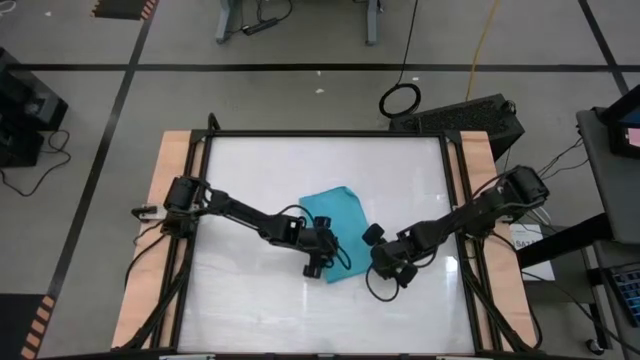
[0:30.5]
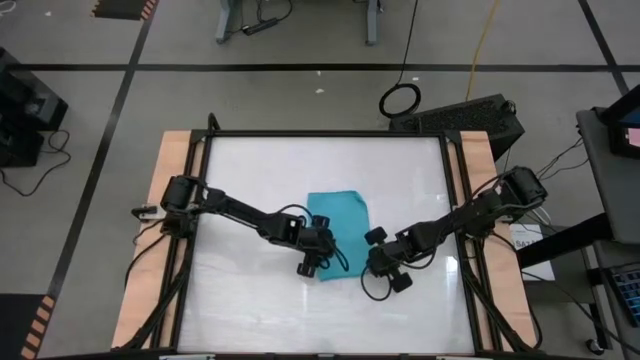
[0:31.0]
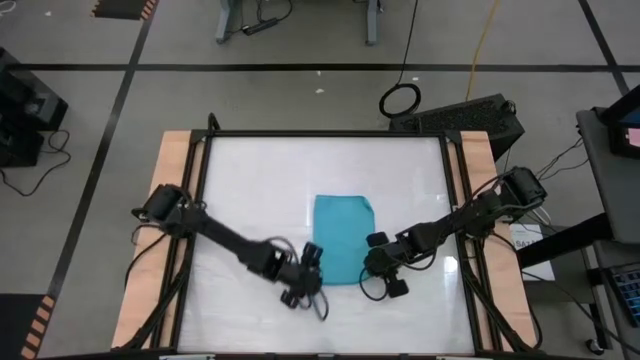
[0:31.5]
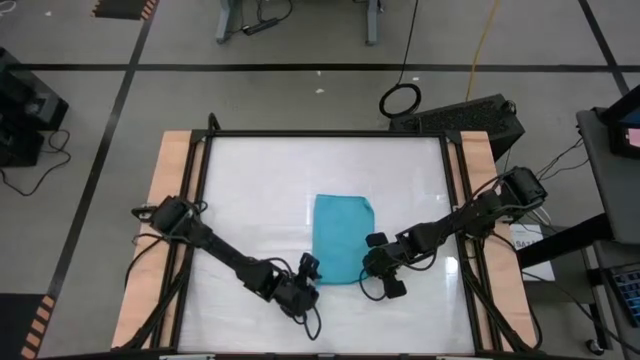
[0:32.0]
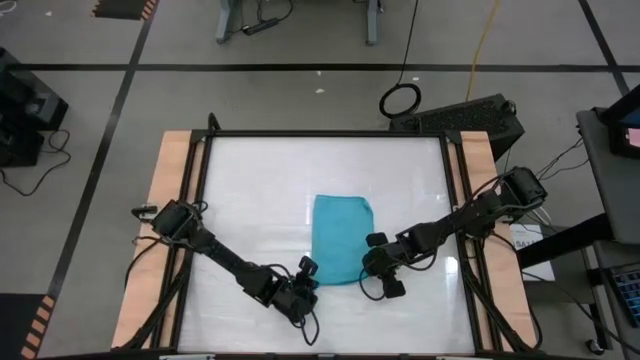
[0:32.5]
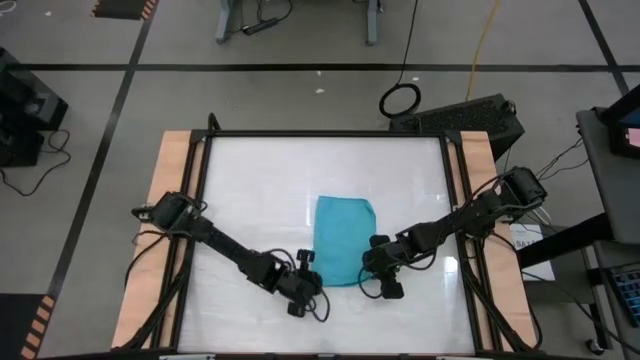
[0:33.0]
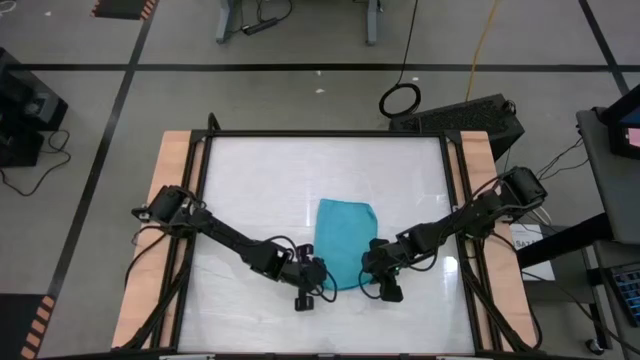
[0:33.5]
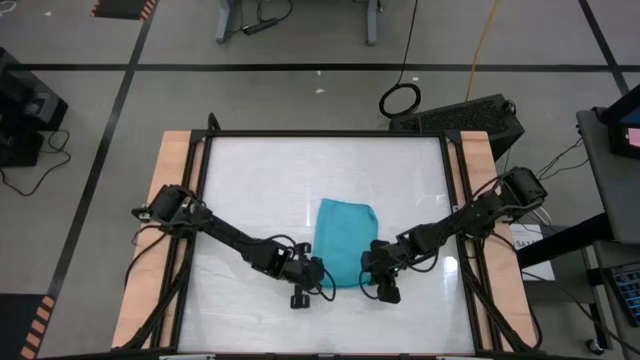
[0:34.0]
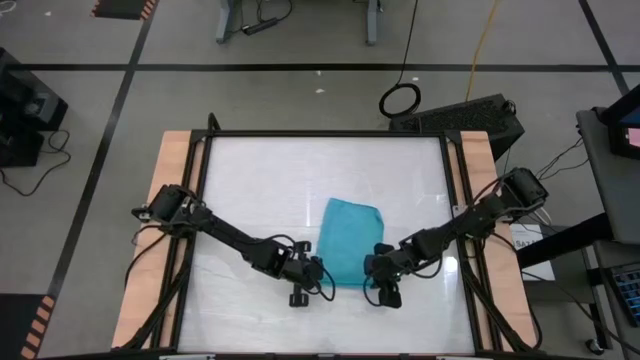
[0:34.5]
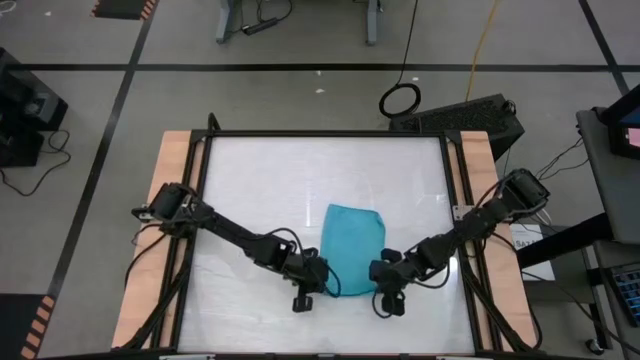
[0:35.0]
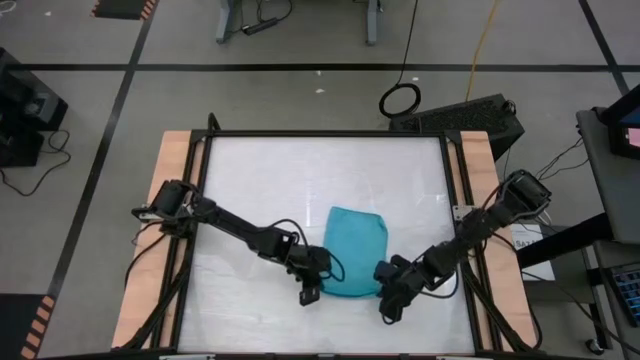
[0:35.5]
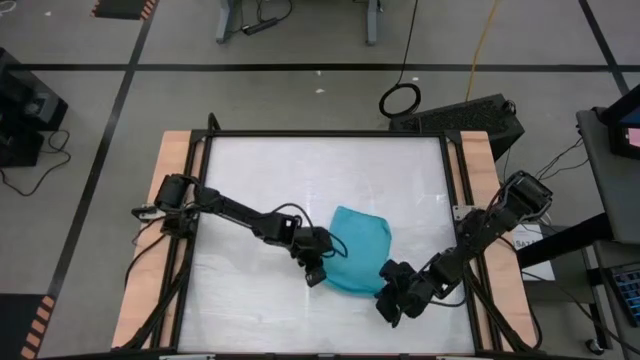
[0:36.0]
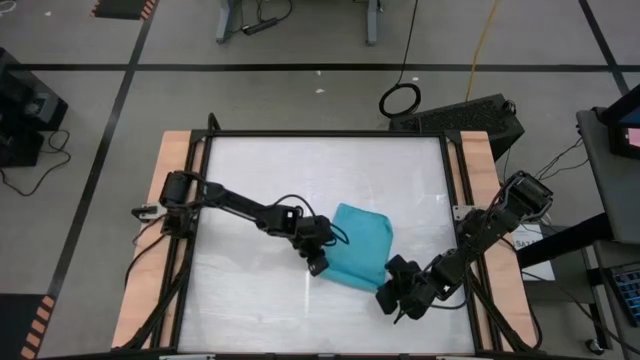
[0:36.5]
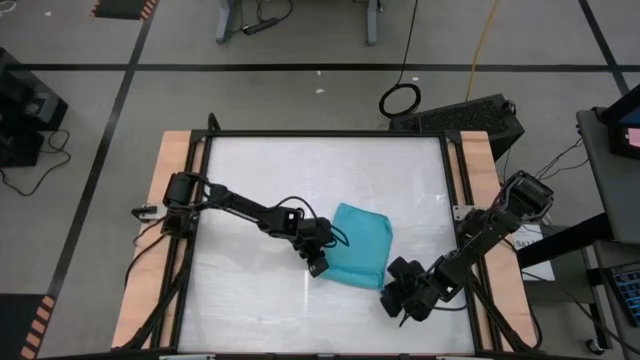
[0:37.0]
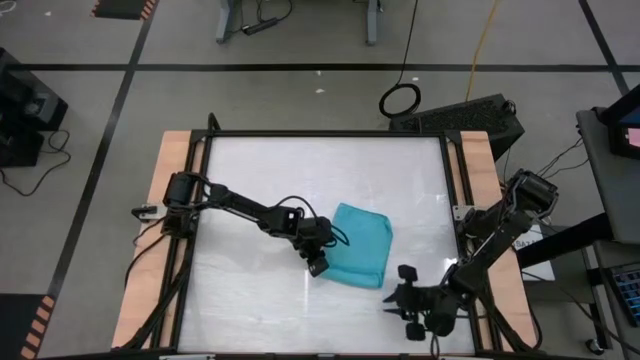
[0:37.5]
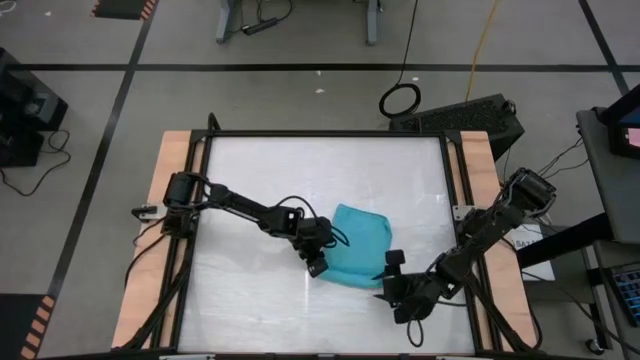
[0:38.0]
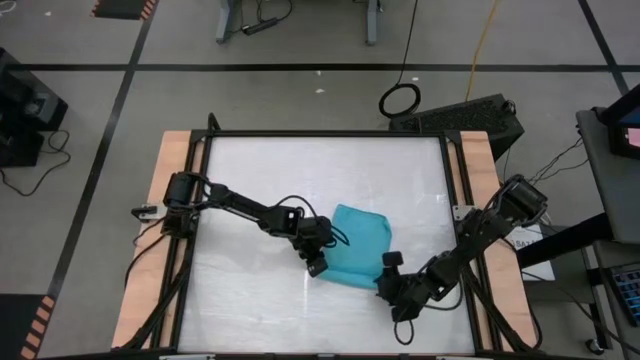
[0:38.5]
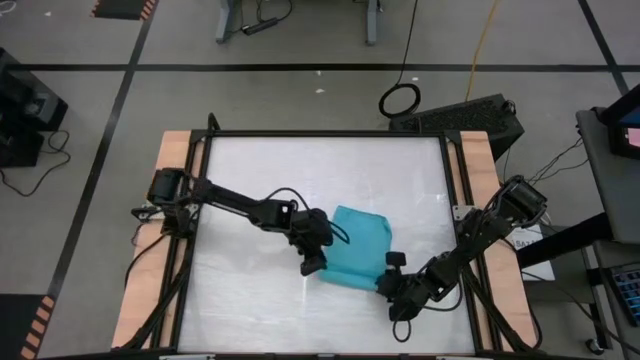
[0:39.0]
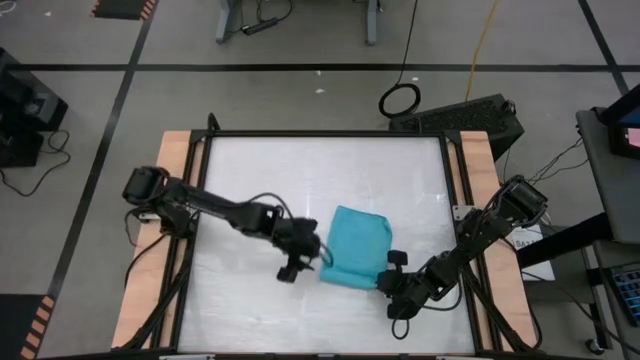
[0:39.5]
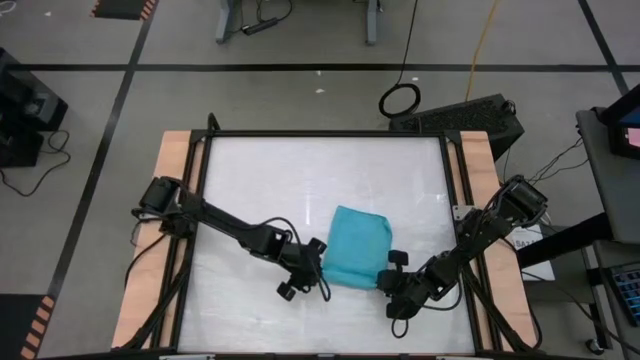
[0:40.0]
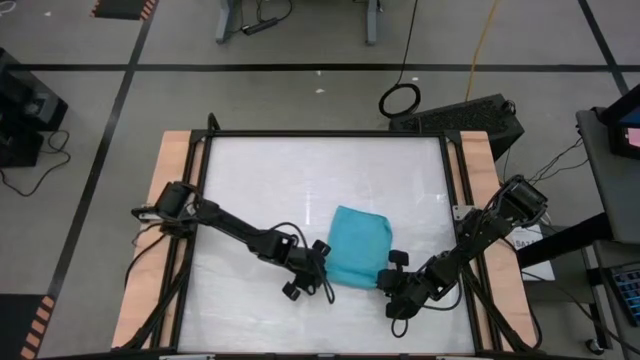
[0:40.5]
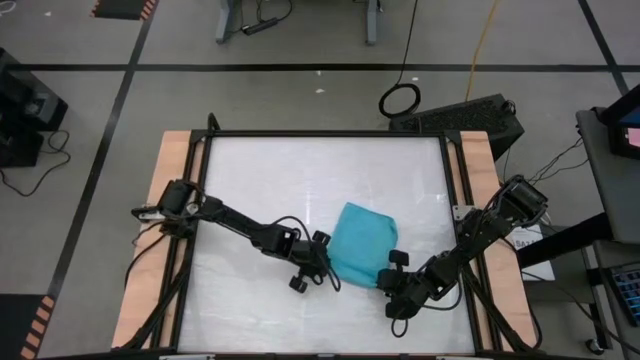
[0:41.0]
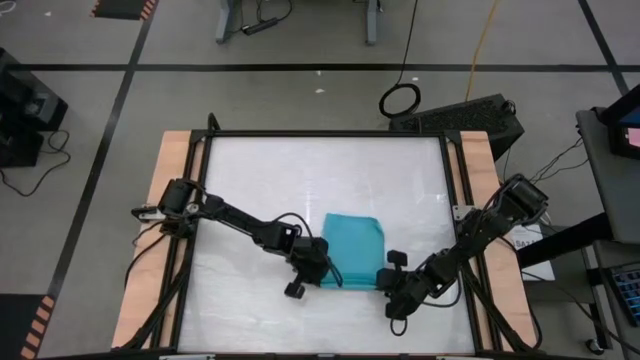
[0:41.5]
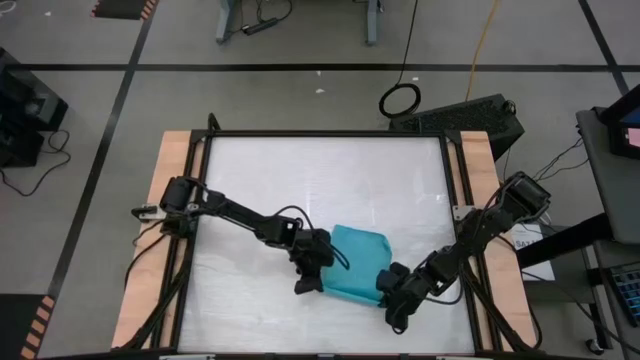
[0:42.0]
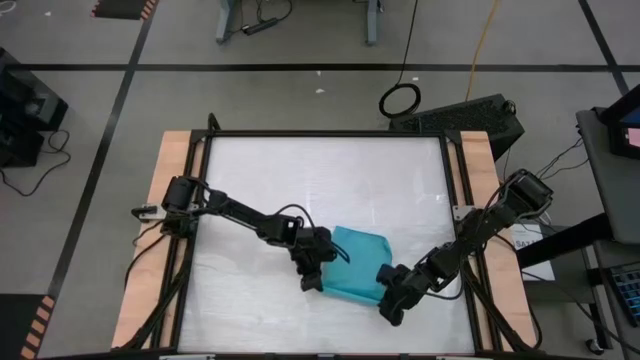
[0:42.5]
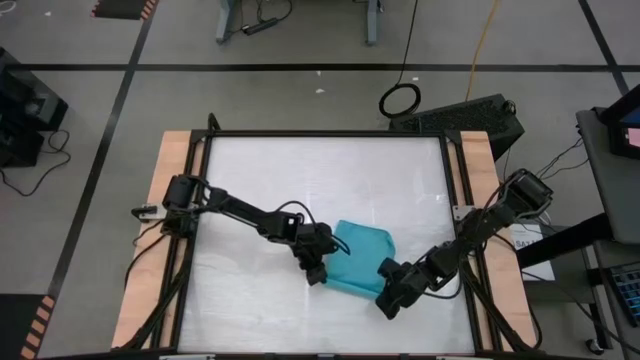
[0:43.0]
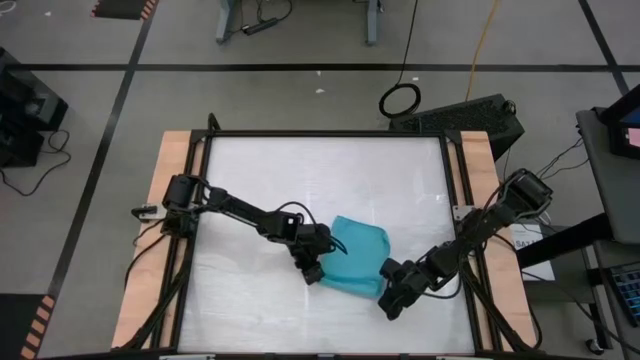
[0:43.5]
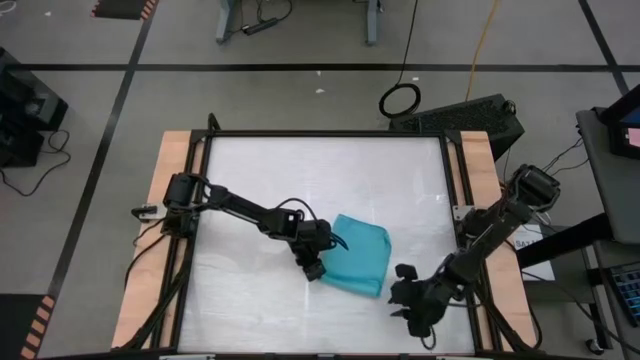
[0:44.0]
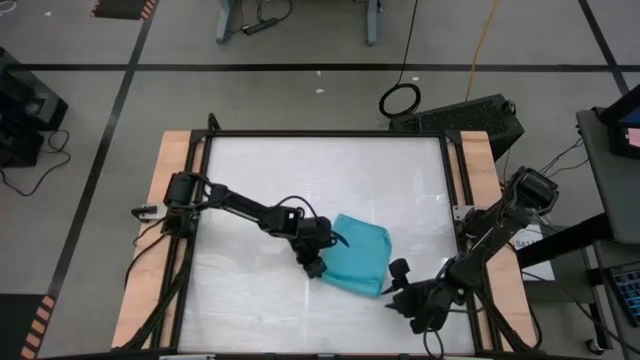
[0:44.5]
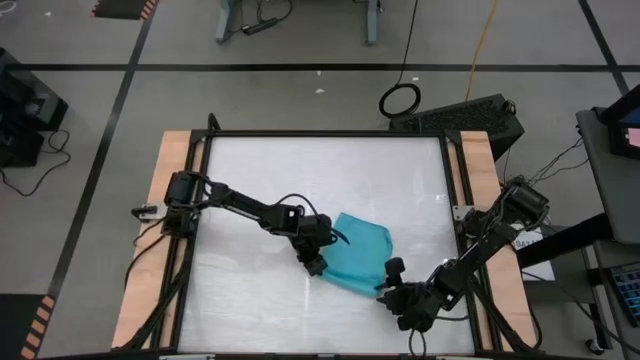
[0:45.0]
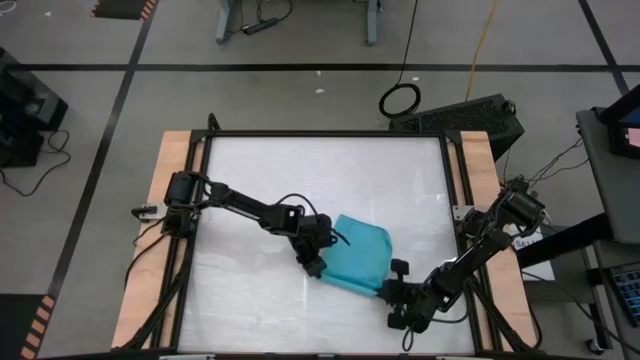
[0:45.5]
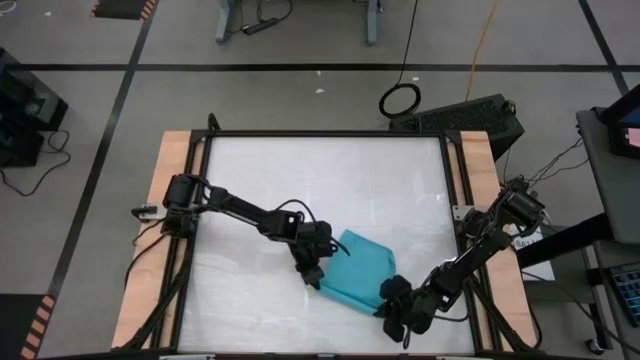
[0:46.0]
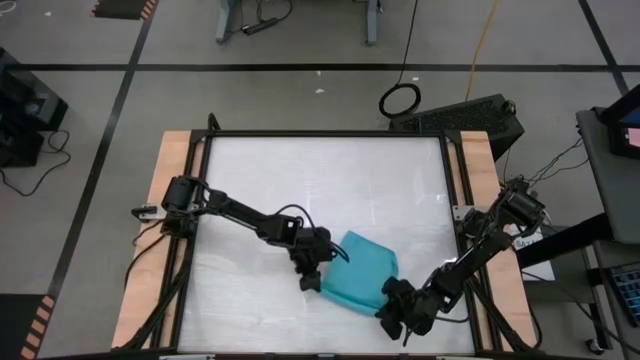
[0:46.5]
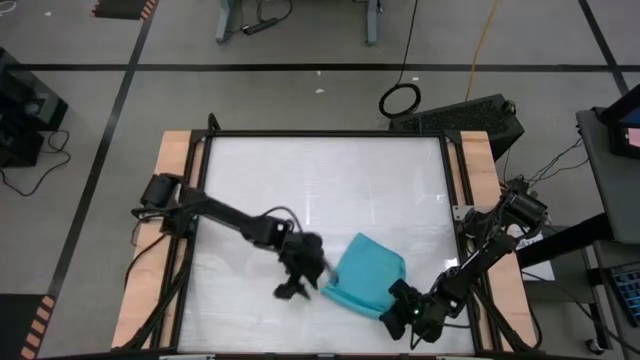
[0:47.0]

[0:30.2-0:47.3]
Task: Roll towel
Roll the blue microfiber towel
